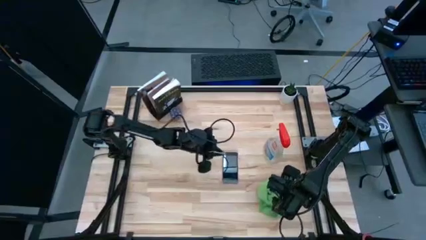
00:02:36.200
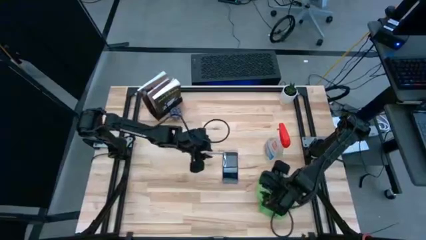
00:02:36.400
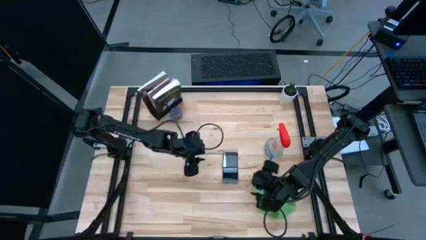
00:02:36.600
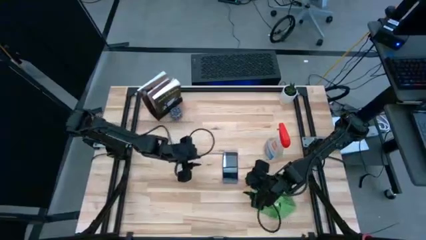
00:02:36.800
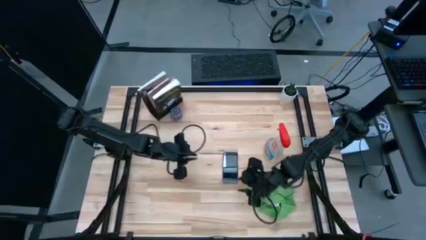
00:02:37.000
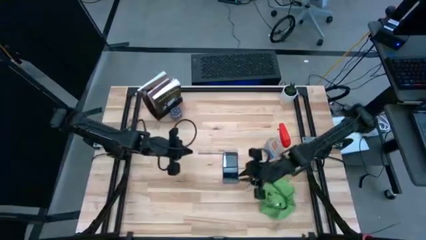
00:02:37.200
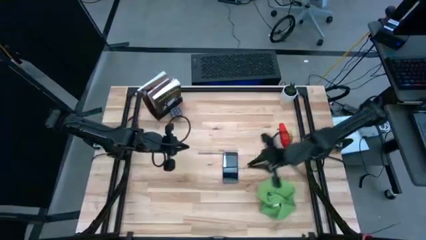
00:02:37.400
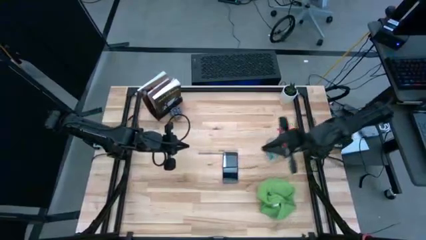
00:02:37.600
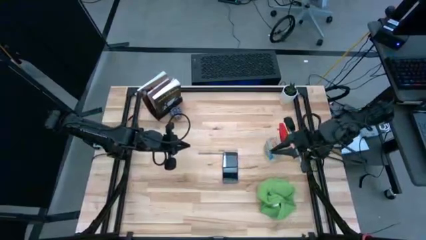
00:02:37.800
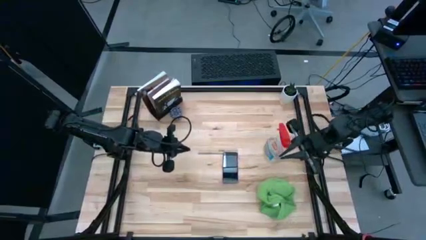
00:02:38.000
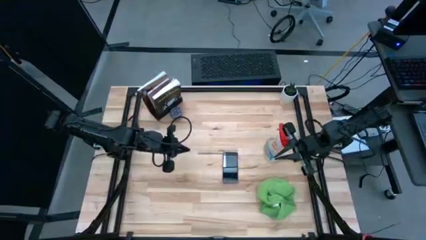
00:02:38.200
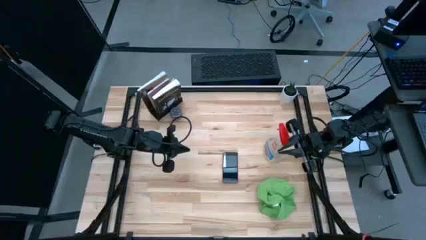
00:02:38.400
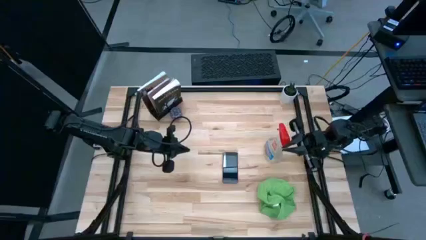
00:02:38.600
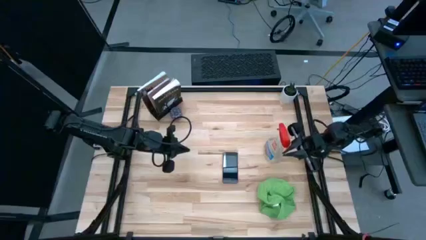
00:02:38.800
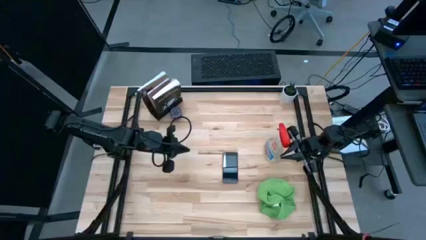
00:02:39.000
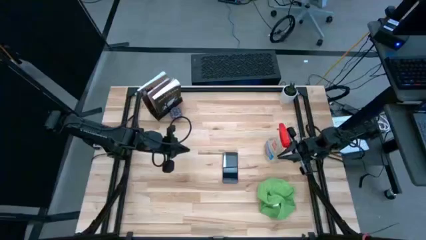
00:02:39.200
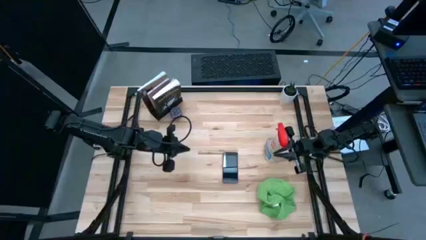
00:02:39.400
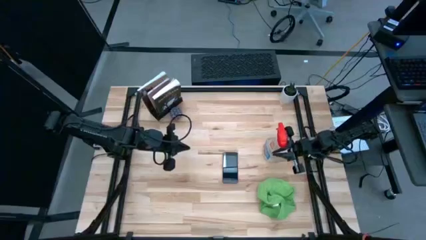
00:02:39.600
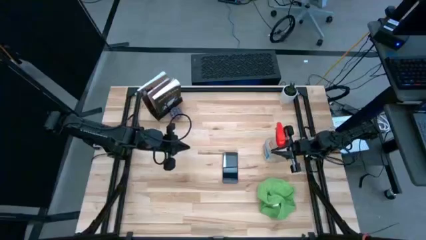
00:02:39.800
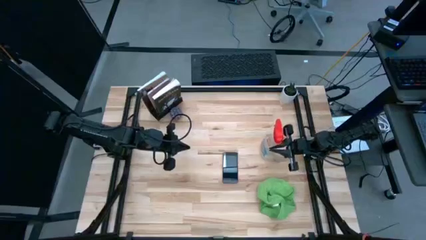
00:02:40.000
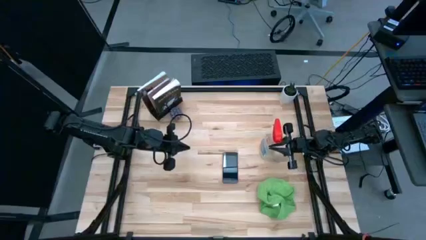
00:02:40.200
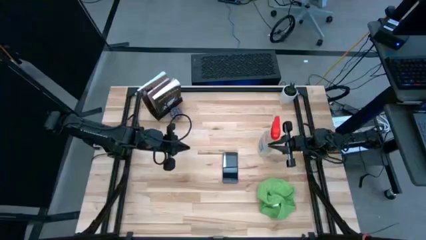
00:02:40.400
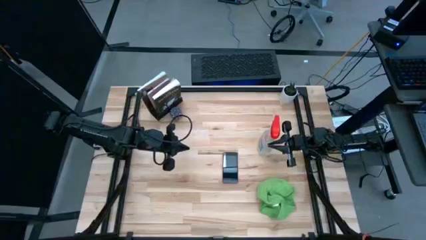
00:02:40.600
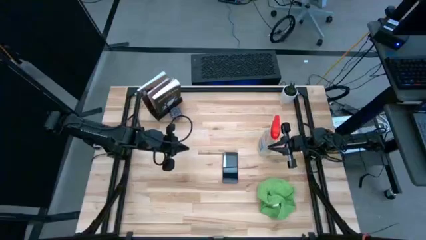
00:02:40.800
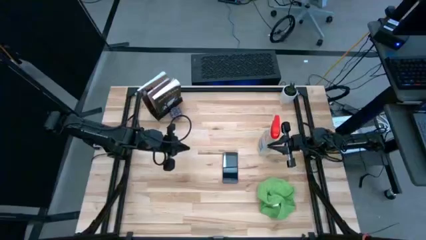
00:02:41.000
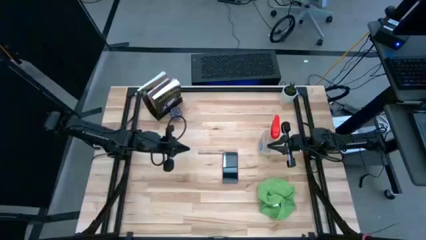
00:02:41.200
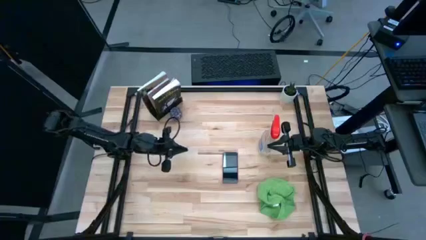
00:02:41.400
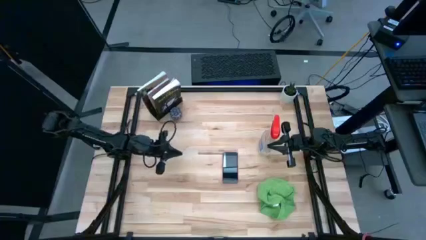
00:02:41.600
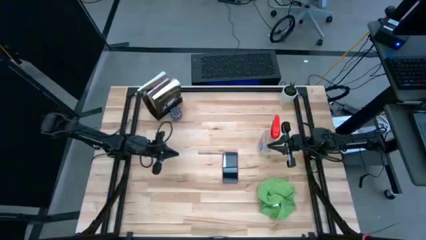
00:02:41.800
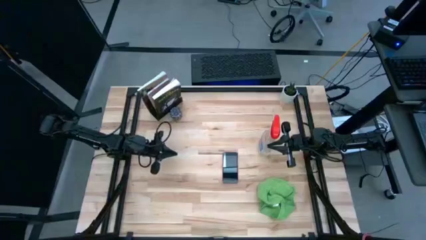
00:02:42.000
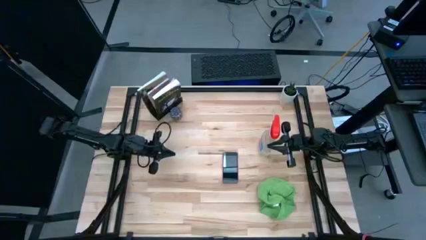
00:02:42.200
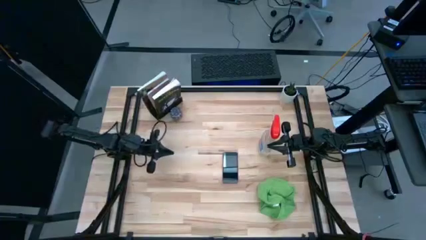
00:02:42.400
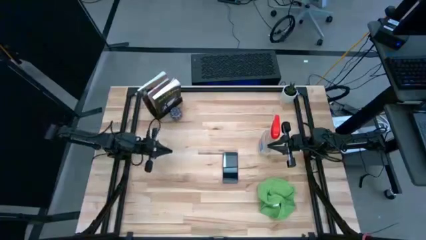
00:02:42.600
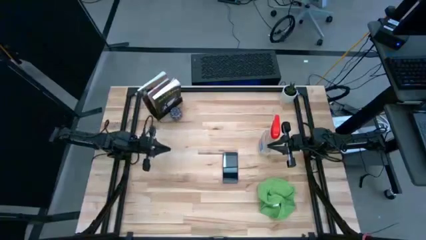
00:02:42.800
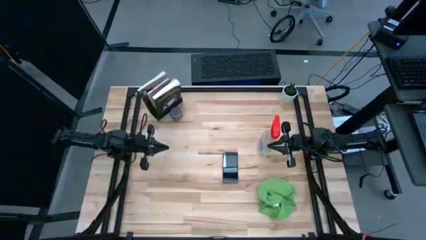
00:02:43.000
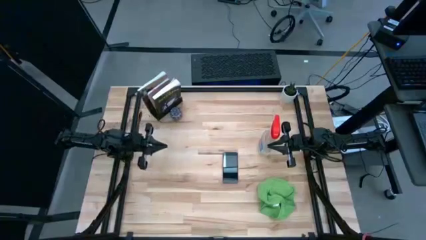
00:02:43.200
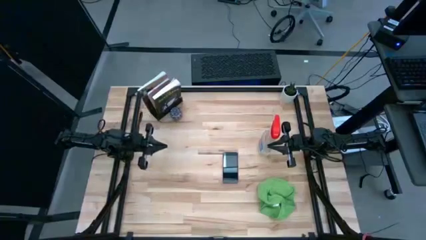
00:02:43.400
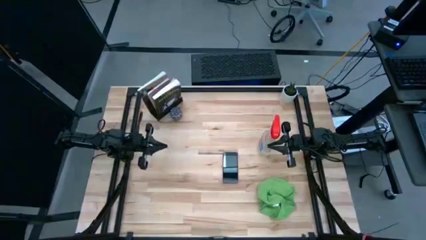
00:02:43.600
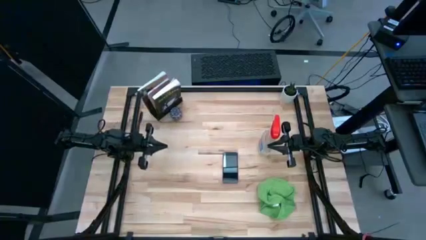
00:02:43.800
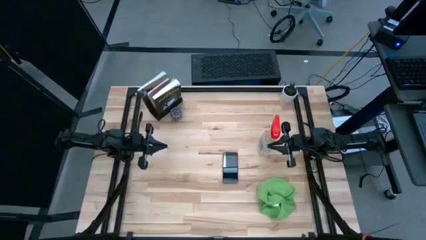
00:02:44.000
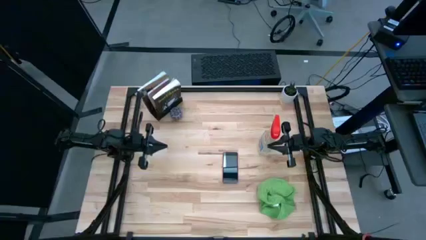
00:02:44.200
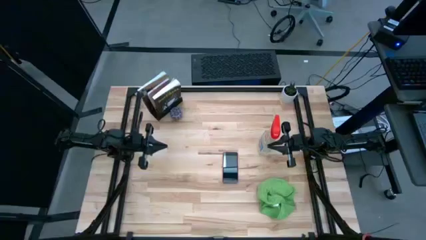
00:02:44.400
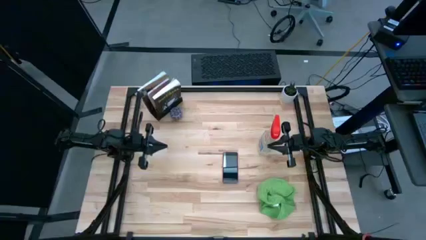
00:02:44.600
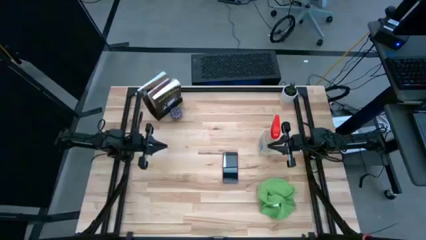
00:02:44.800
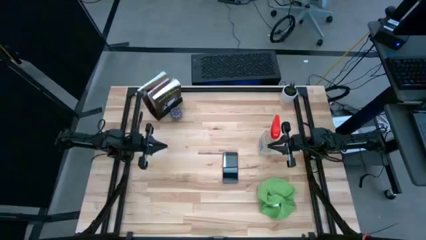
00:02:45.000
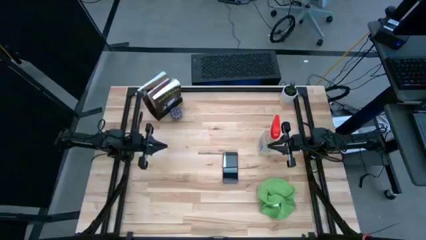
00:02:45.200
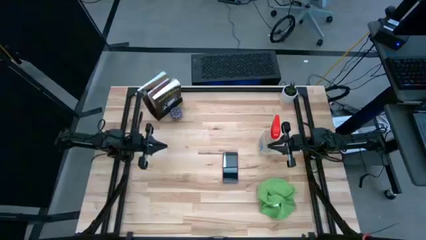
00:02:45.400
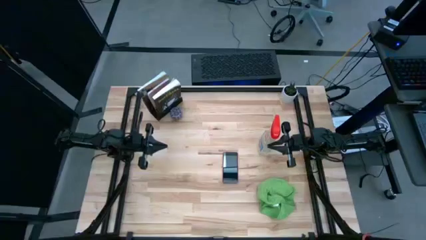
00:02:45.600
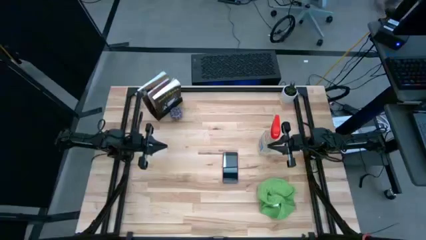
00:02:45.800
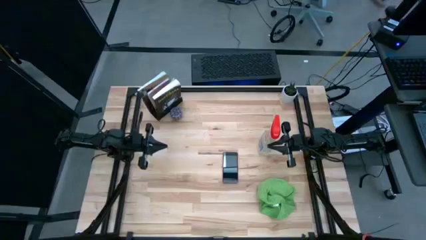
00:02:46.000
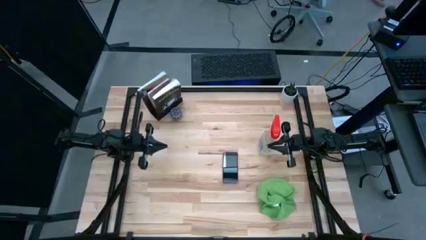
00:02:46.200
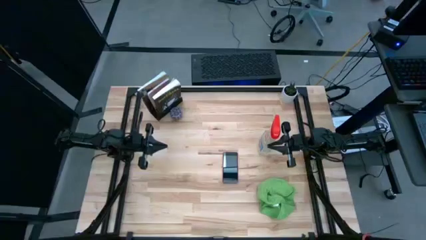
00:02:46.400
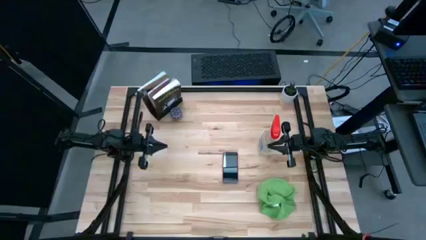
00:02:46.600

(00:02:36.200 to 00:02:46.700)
Task: Apply microfiber cloth
Return to Home Position
